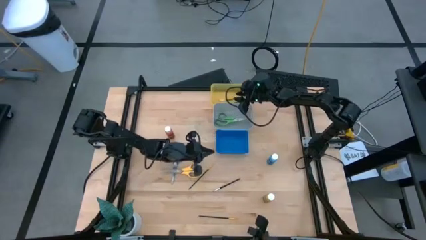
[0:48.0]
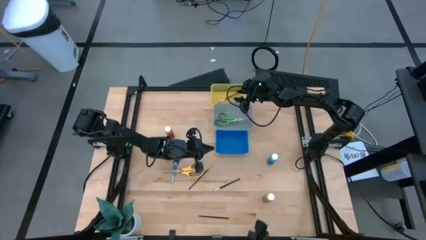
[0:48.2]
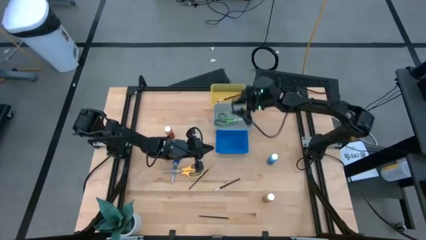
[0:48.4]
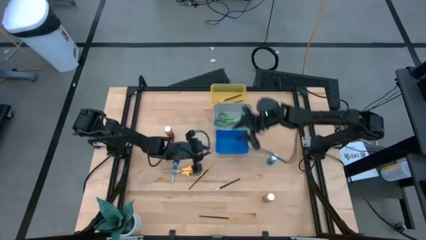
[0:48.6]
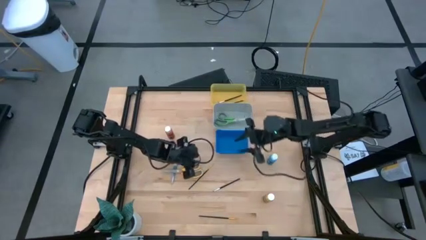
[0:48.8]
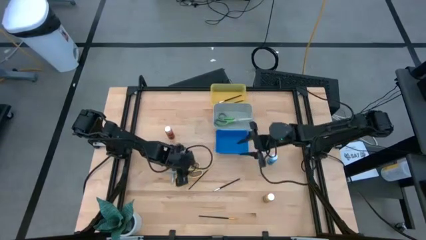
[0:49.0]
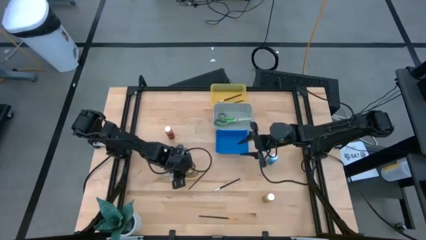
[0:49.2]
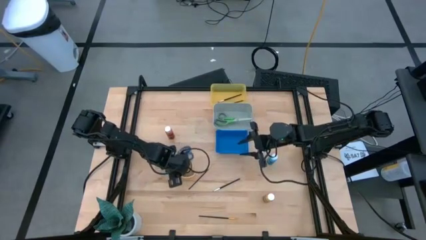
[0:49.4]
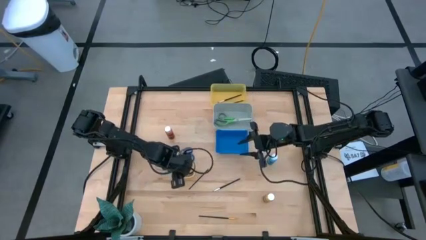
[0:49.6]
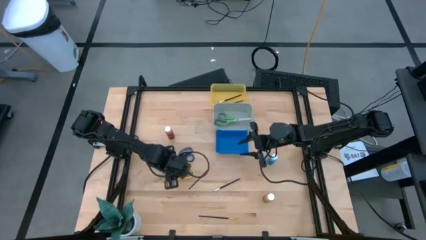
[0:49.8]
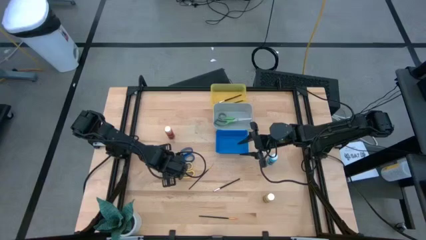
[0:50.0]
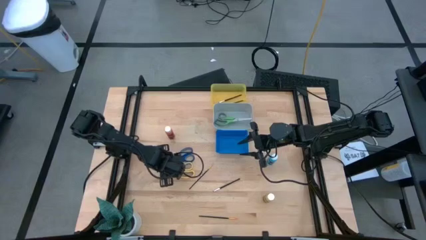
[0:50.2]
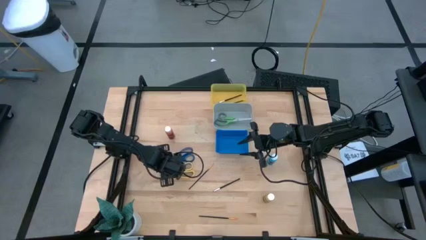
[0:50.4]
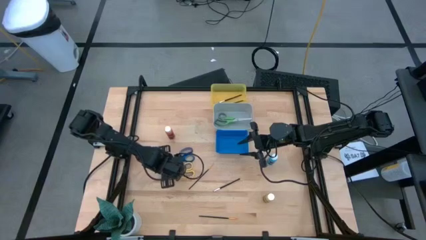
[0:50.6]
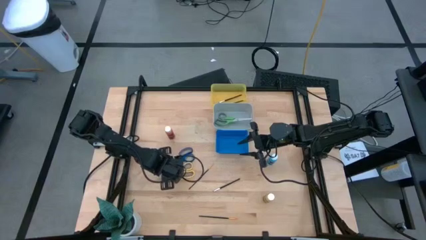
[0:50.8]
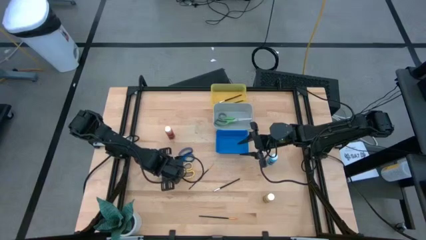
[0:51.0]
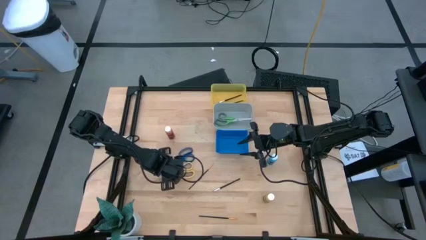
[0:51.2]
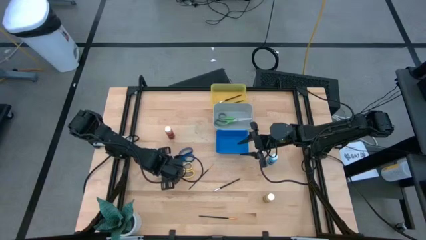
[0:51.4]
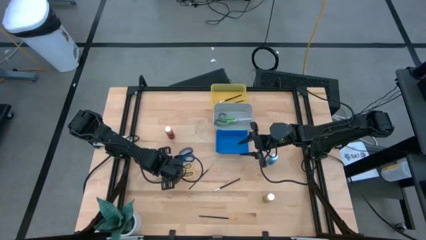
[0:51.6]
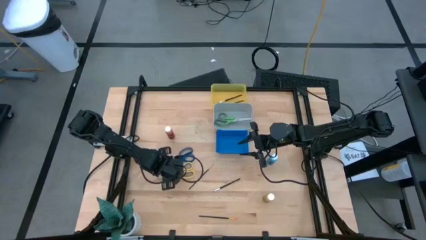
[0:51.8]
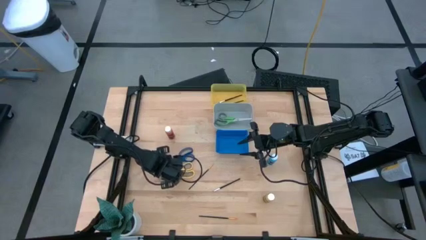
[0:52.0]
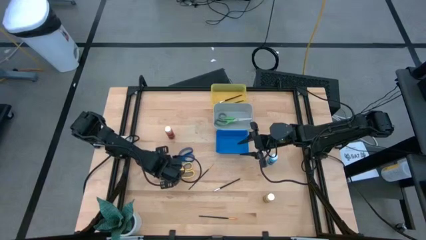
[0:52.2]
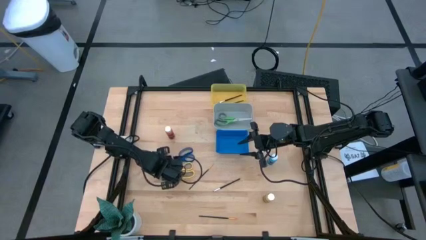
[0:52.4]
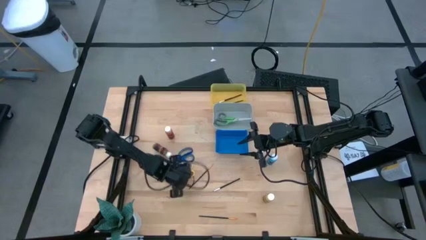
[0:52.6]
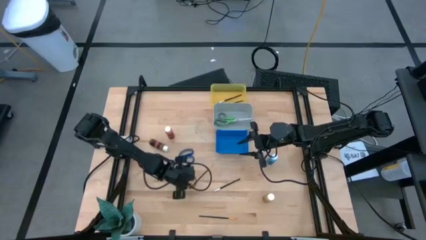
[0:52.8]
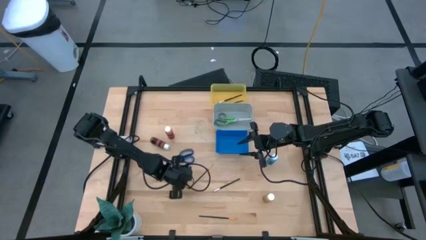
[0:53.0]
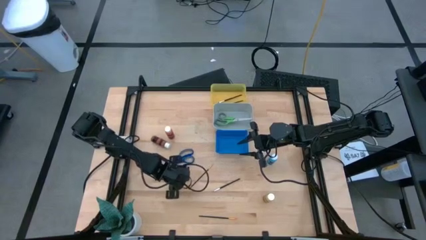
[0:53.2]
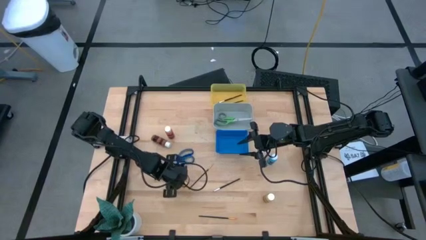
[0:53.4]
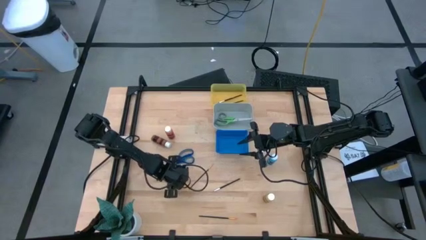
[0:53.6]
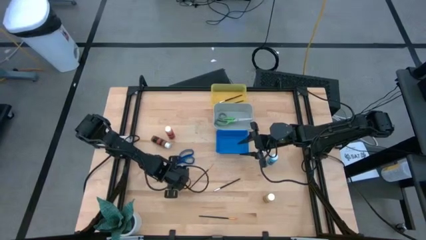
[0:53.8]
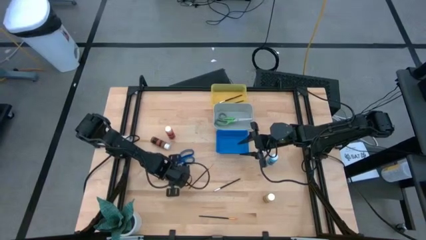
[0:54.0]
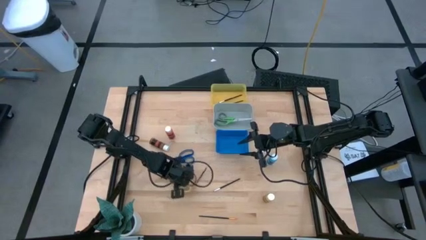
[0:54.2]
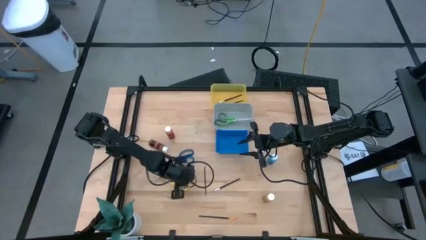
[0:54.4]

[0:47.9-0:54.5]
Task: Pick & Place Paint Supplies
Put the yellow scissors into the gray bin

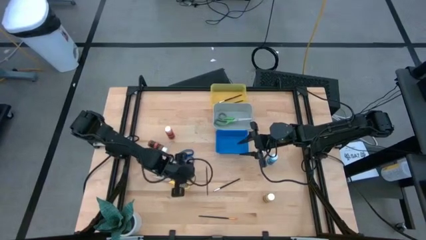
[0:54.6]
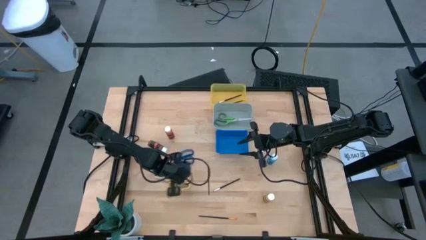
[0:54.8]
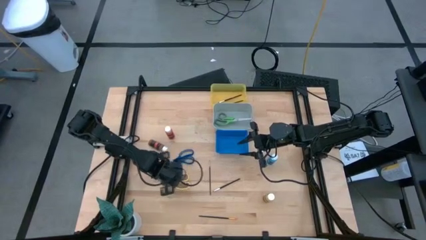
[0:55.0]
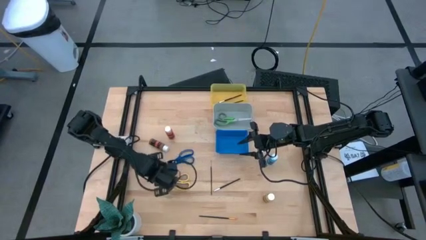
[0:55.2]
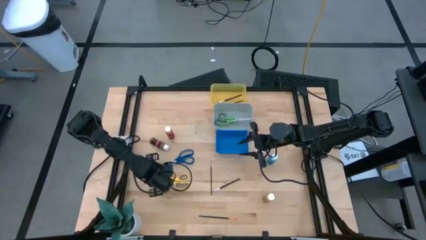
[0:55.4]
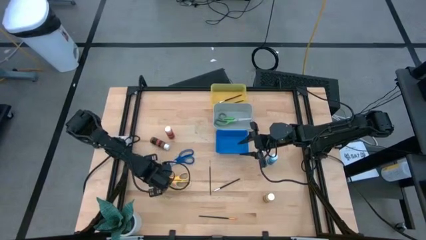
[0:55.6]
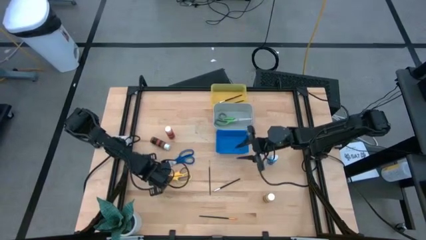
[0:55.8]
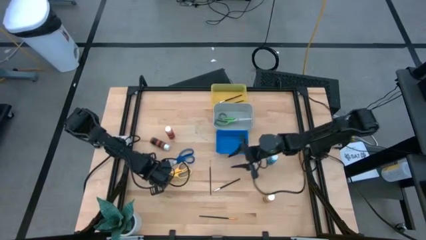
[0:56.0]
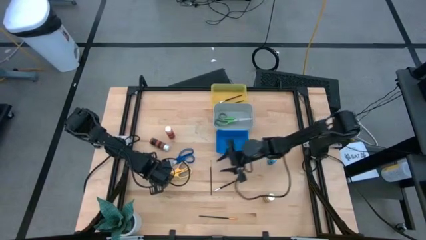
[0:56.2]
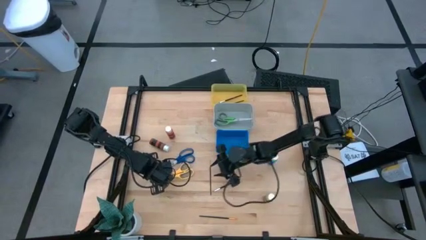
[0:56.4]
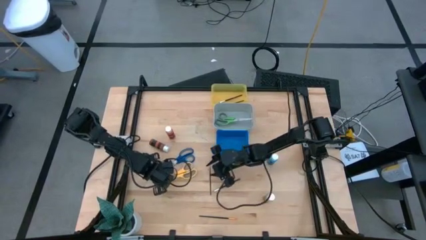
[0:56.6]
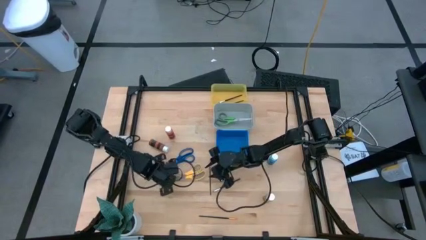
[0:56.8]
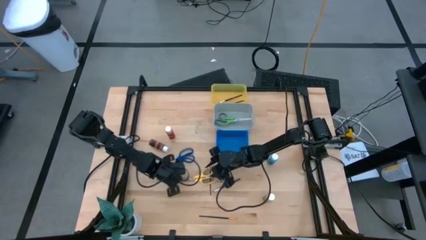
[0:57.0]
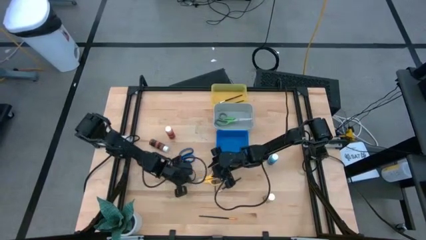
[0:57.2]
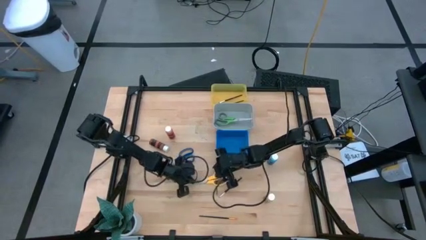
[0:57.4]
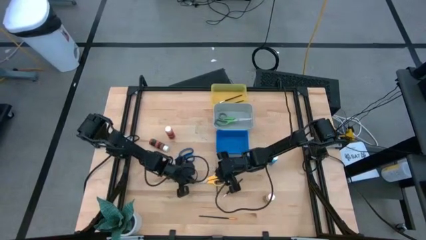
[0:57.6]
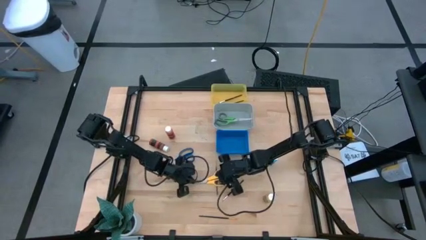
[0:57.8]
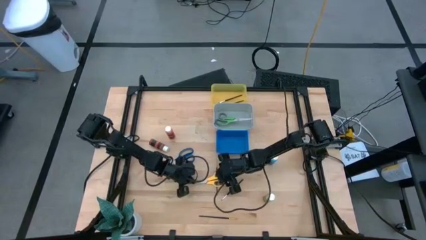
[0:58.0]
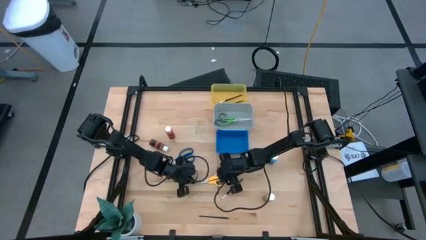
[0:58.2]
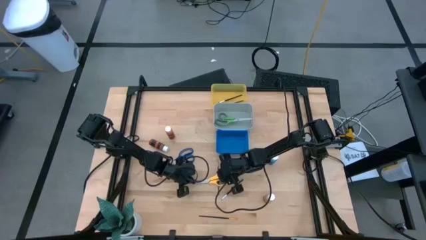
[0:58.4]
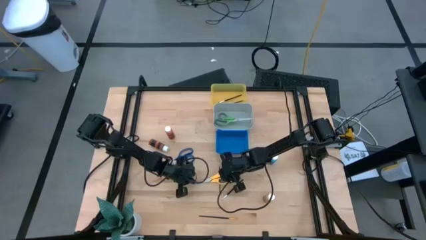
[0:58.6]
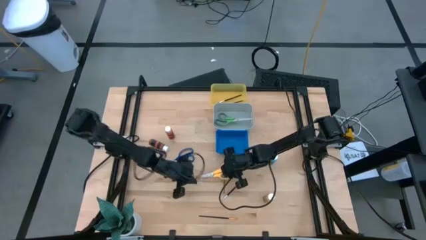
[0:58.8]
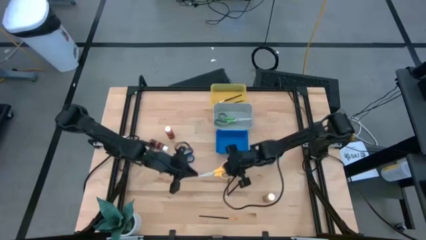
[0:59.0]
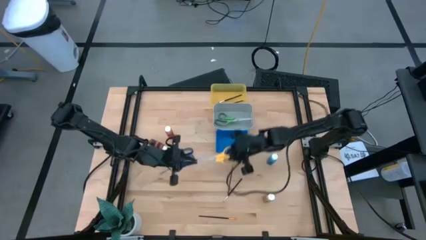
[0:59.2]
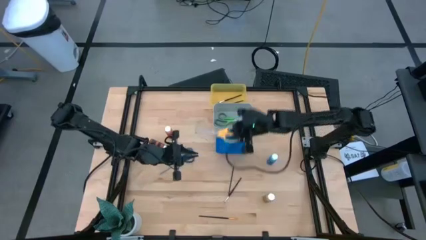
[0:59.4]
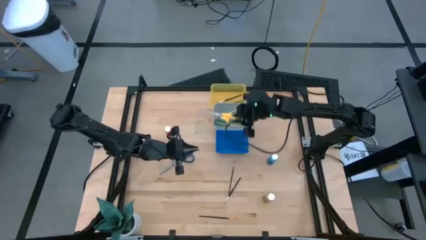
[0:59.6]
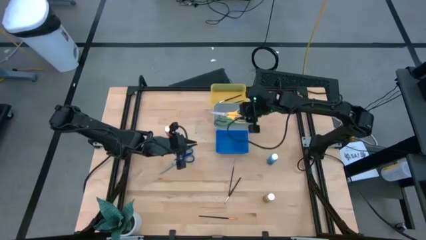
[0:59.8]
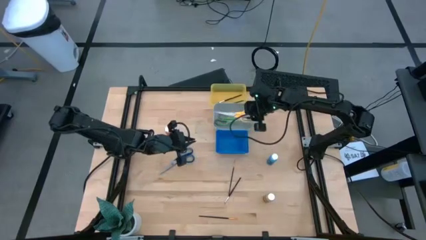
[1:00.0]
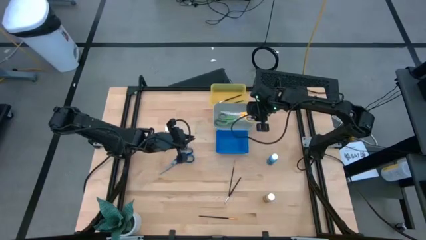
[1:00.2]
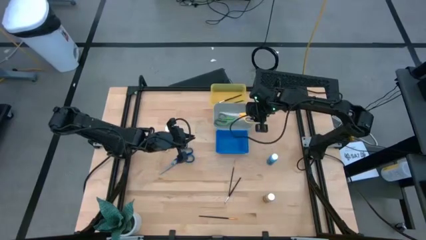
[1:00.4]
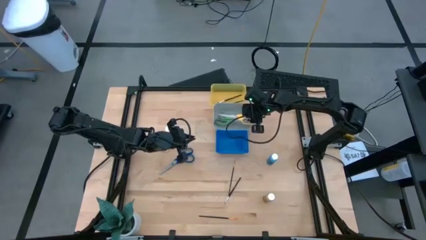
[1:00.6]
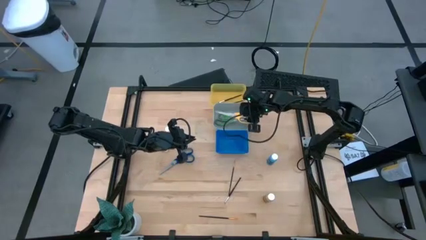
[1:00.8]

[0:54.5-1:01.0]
Put the yellow scissors into the gray bin

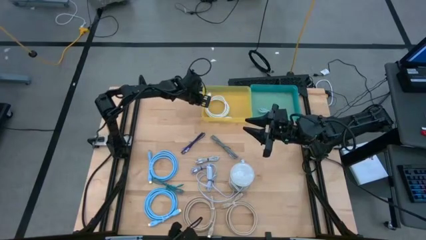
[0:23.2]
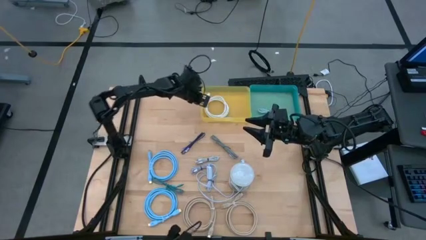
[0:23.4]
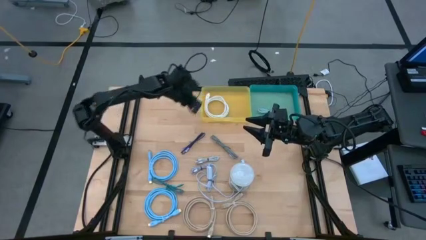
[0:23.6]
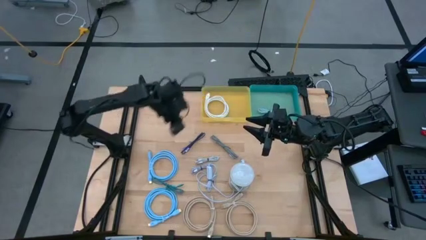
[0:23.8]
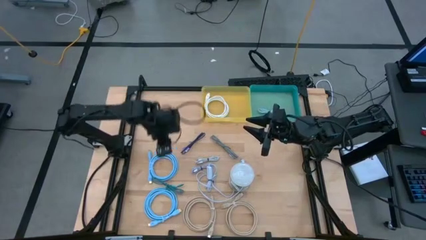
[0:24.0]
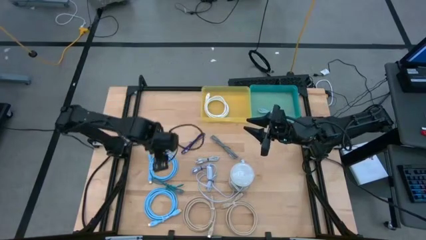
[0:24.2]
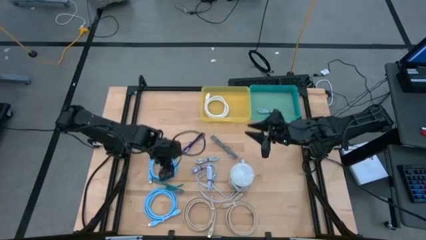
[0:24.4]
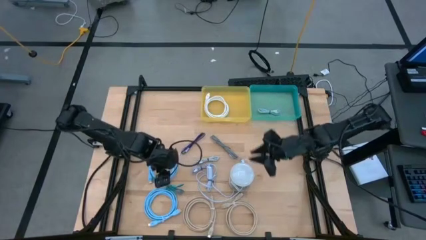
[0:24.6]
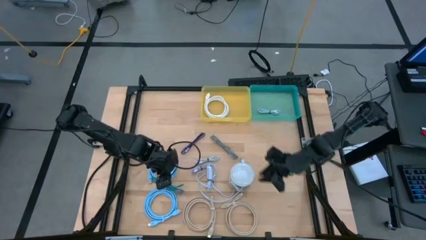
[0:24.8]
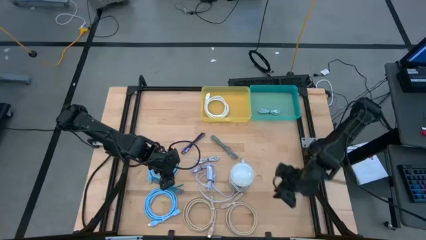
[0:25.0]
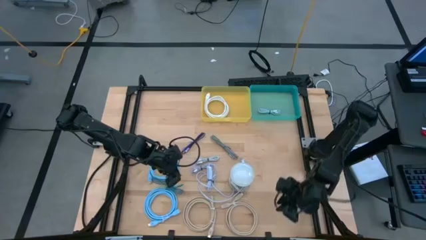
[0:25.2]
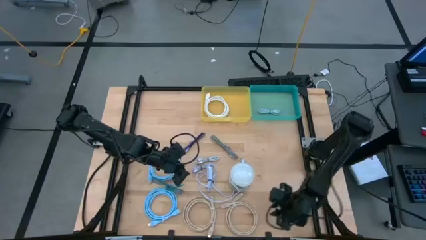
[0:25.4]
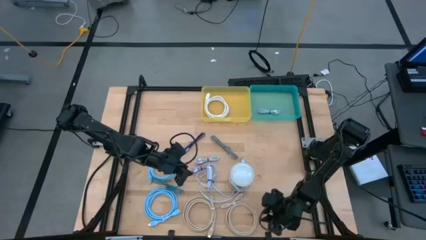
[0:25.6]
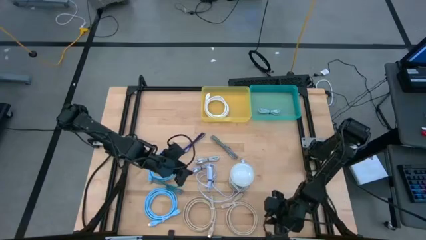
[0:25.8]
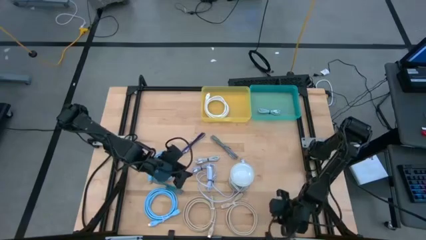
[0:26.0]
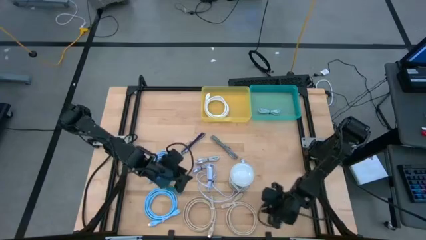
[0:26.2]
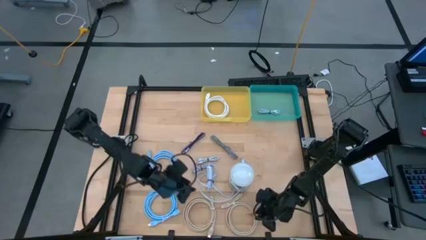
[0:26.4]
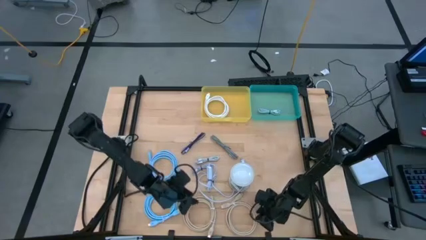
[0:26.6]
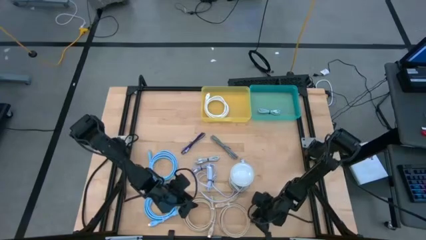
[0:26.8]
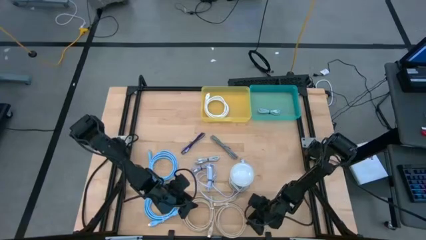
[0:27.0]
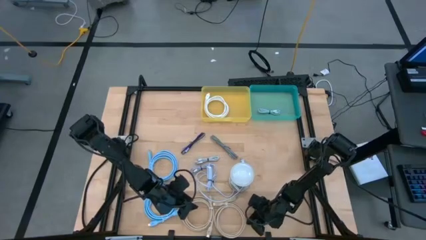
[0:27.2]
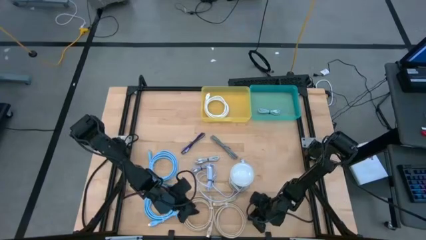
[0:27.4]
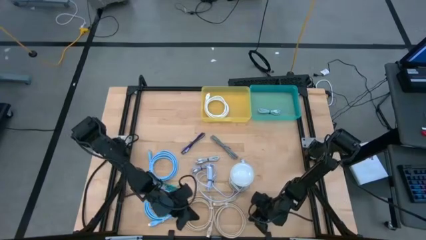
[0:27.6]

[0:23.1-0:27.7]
Task: Pick & Place USB Port
Put the right brown HDMI cable into the yellow bin
